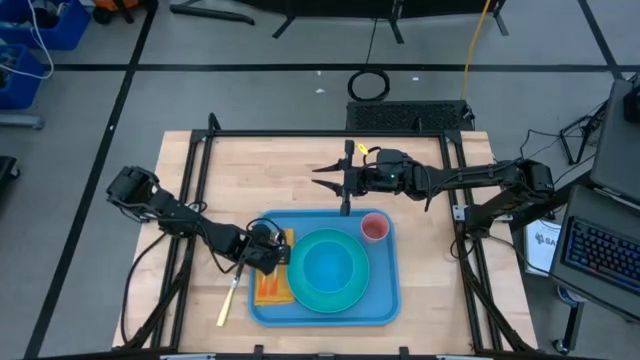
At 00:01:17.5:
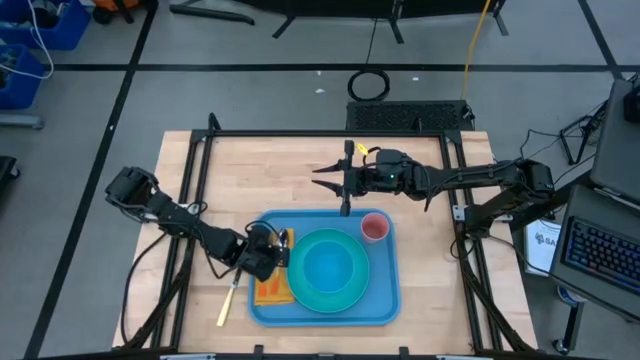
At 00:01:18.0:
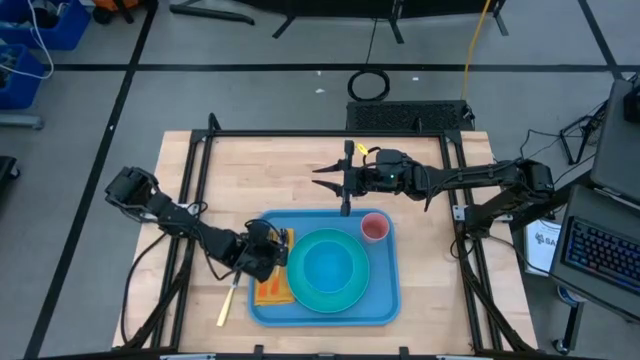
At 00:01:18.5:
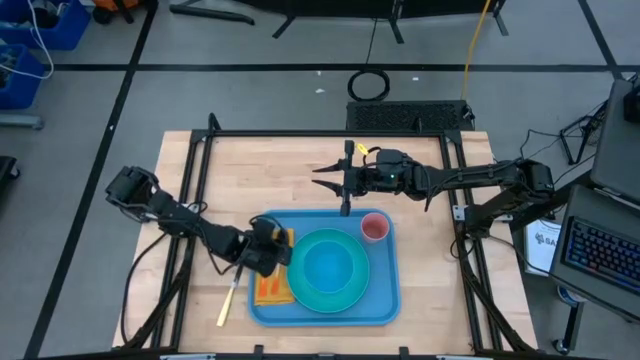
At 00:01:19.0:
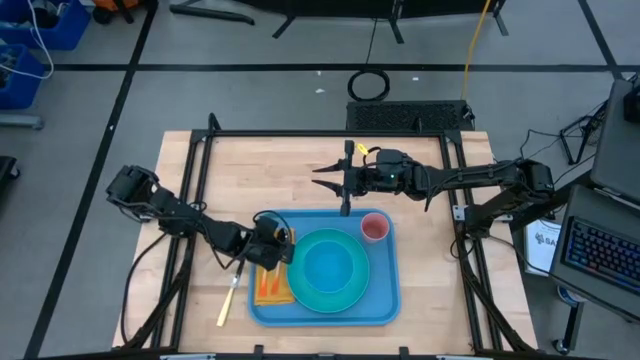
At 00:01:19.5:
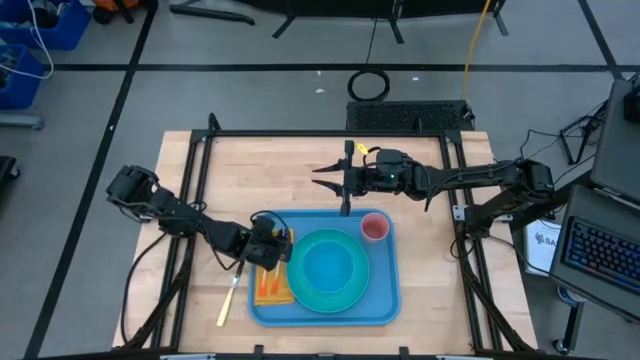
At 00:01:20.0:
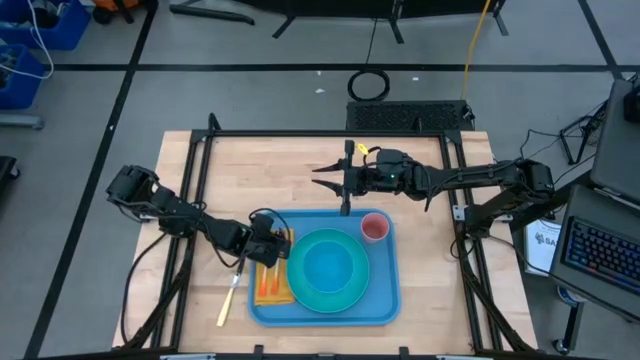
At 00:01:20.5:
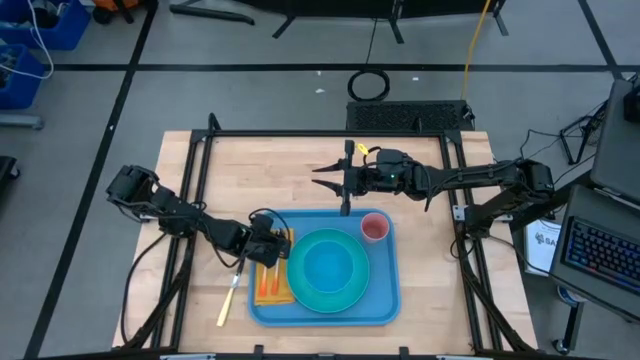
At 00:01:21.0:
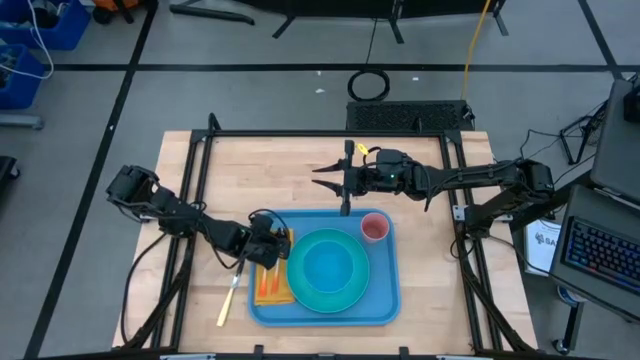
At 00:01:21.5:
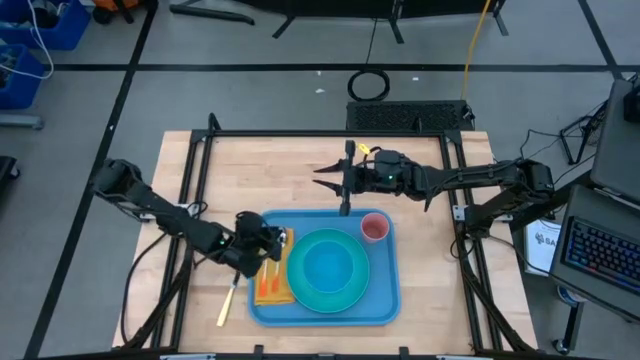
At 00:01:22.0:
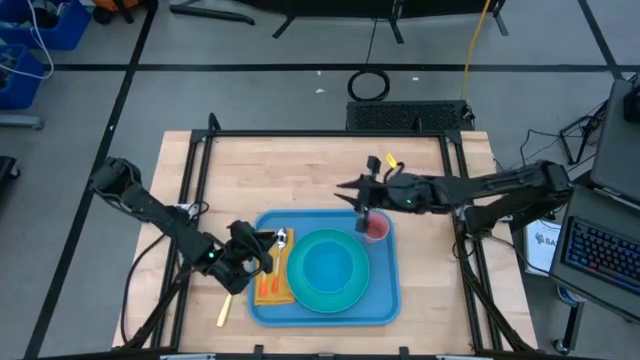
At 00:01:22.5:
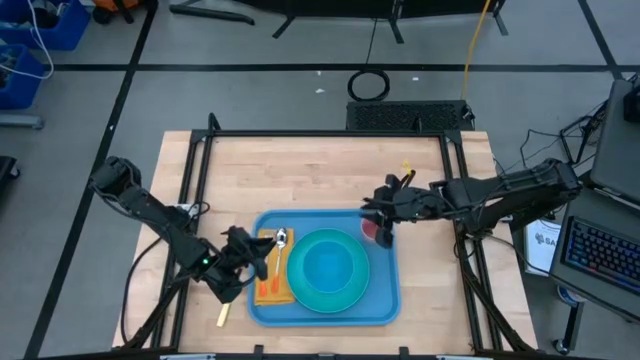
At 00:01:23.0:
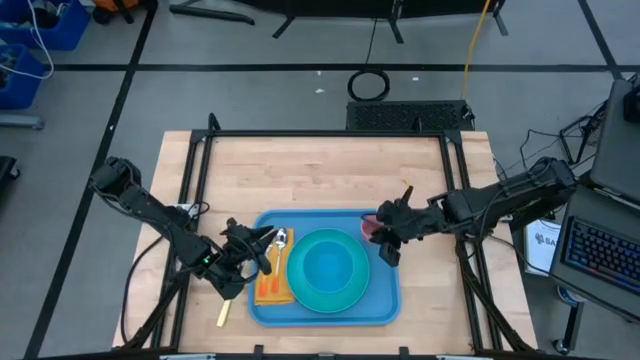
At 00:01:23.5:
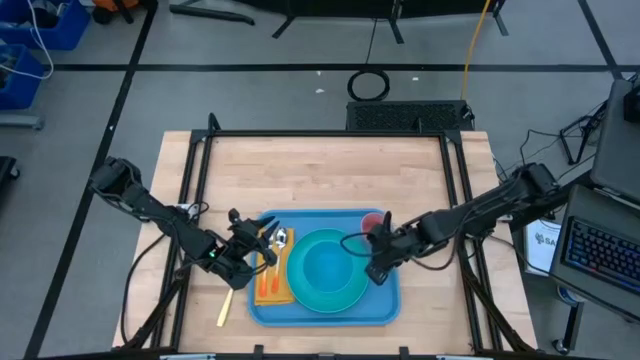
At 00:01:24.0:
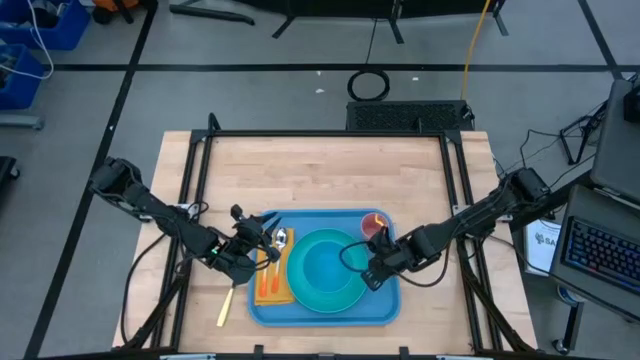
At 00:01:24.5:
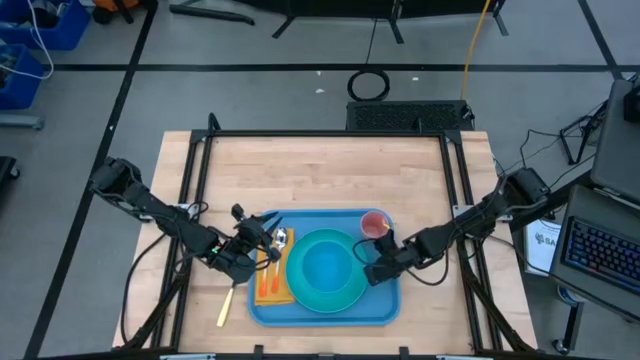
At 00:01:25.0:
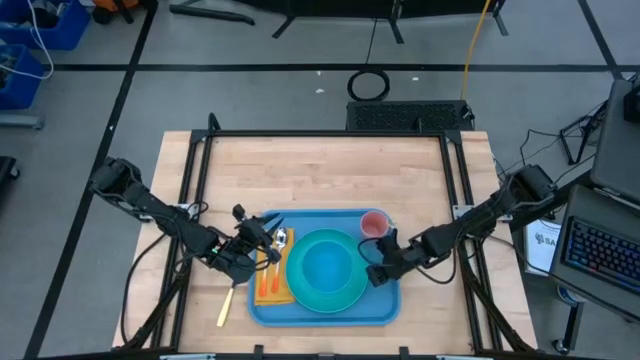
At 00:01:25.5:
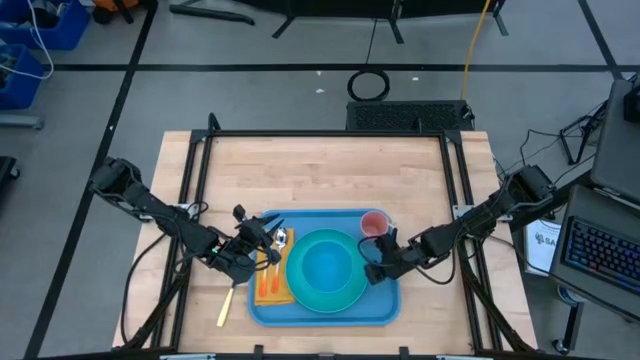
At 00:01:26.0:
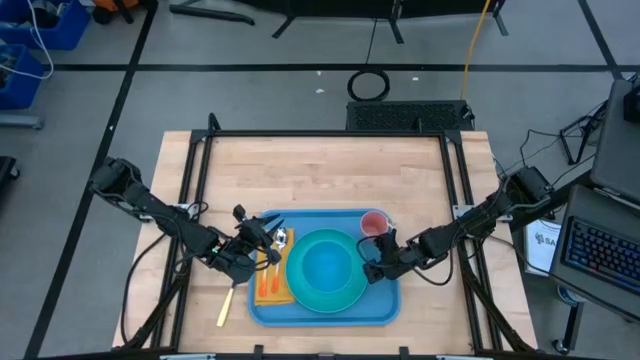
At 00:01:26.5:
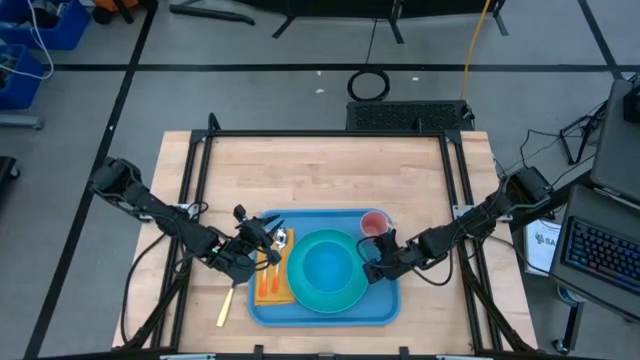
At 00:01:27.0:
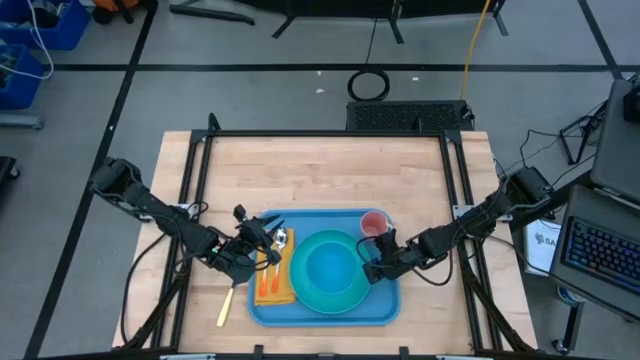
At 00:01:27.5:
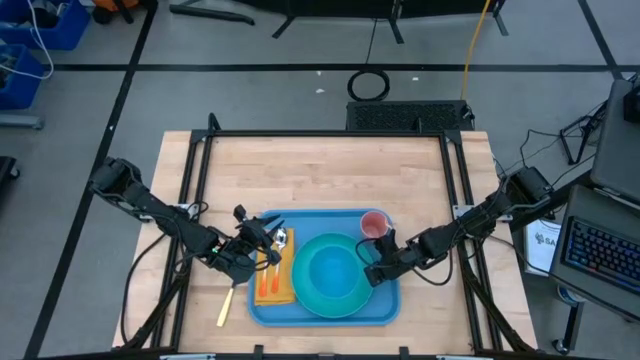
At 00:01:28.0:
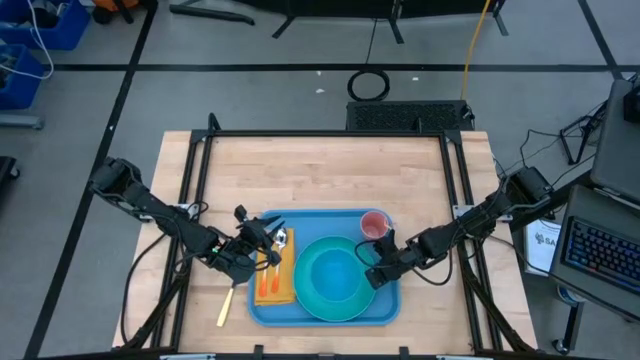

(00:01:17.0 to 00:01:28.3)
Task: Set up tray
Adjust the light blue plate in the blue serving tray

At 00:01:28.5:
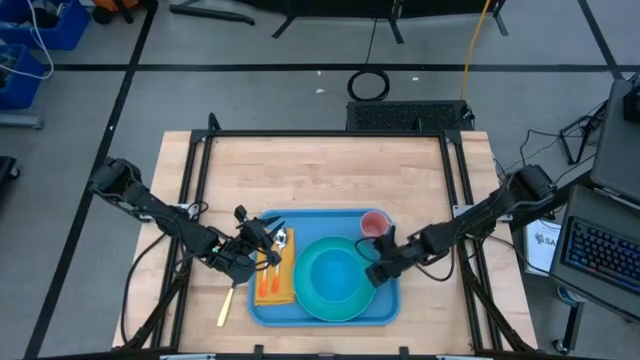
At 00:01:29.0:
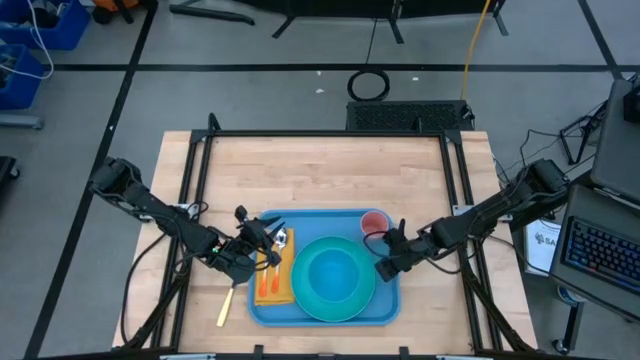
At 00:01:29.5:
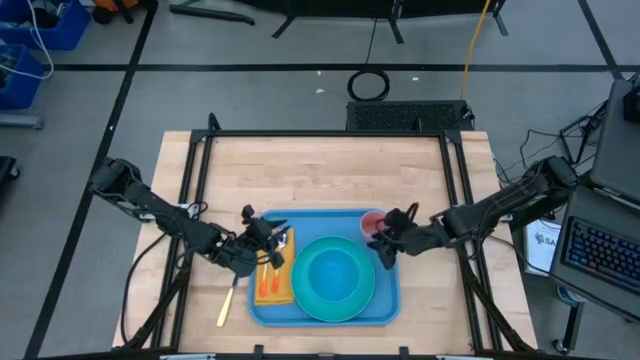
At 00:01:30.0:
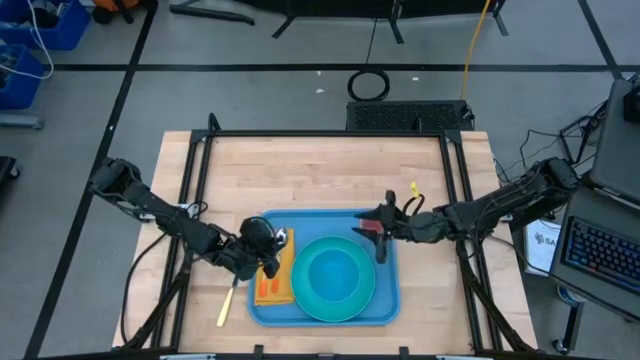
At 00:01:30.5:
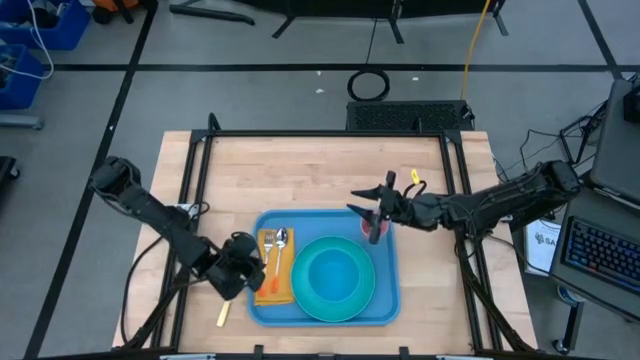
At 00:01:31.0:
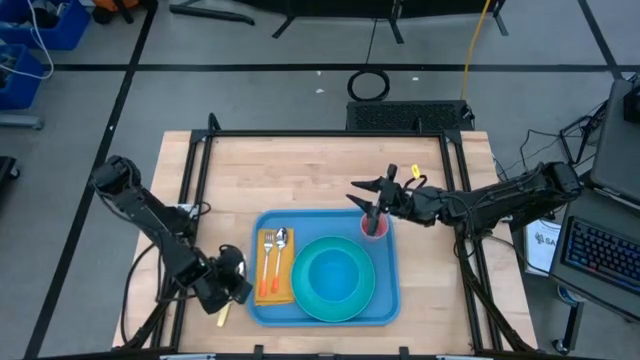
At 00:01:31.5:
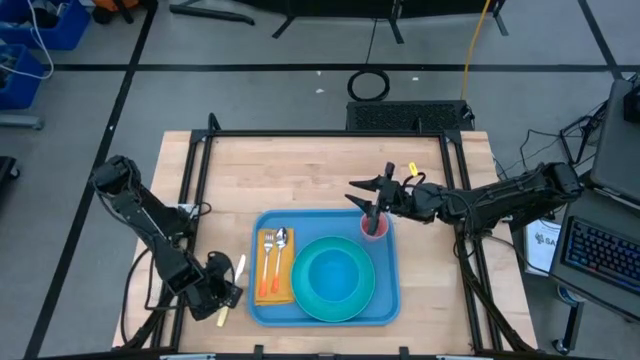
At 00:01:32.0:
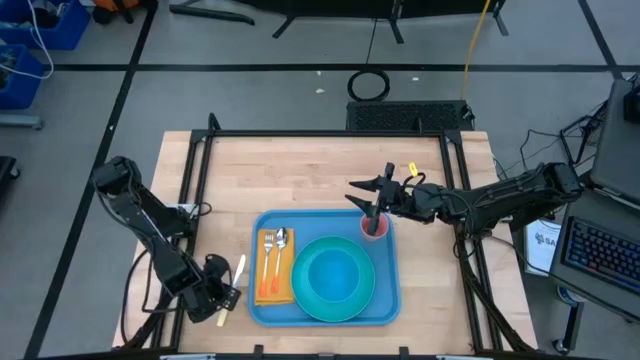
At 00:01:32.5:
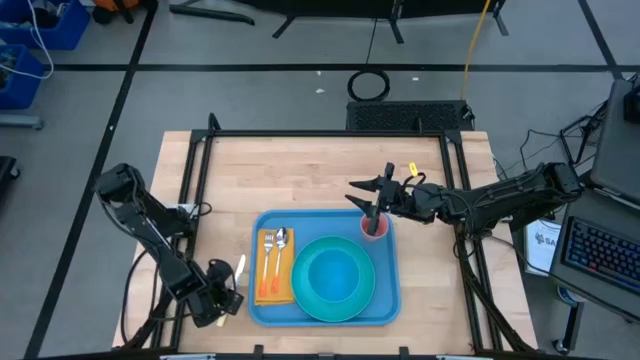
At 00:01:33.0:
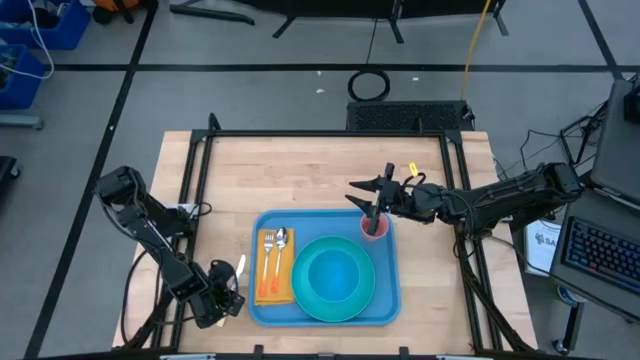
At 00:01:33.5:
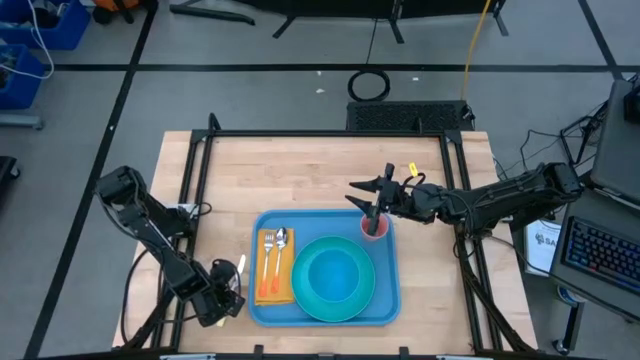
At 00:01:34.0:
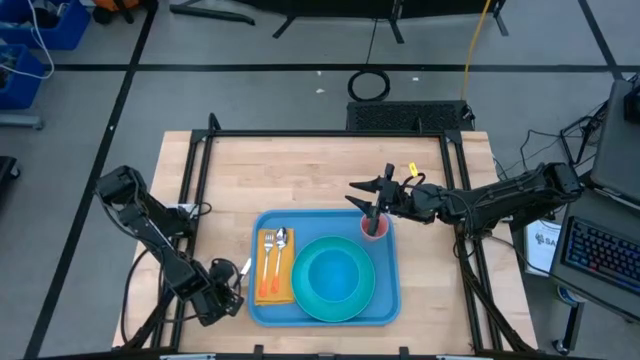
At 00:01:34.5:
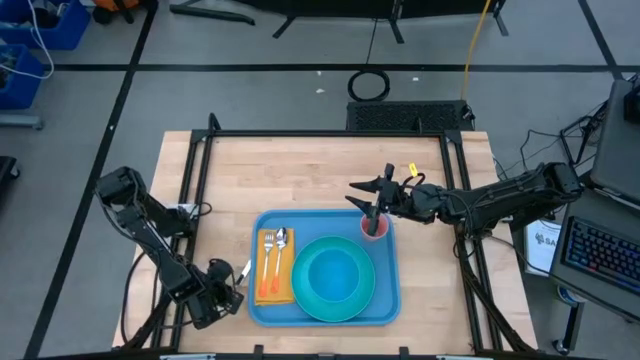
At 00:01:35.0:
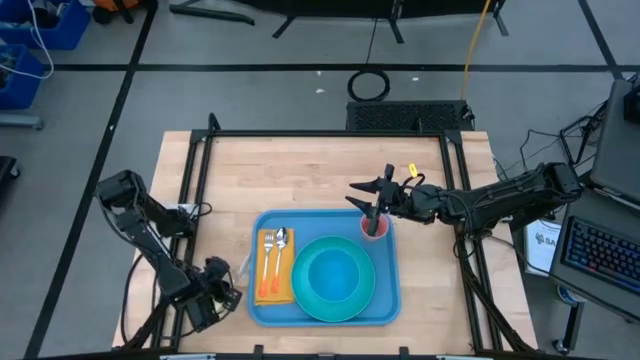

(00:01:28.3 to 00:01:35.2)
Put the yellow knife on top of the yellow napkin in the blue serving tray

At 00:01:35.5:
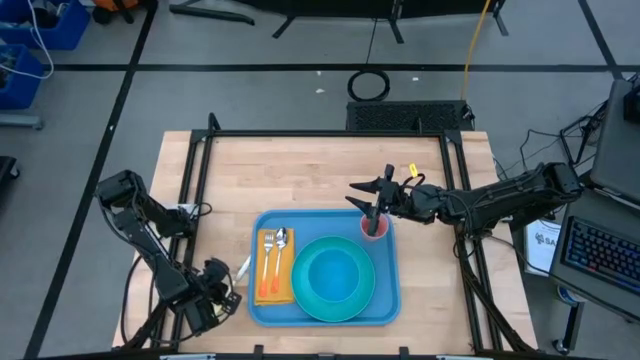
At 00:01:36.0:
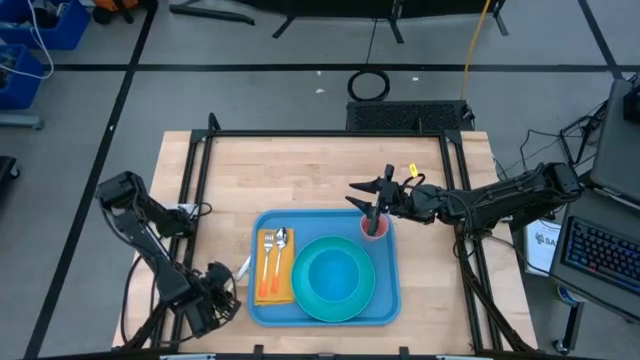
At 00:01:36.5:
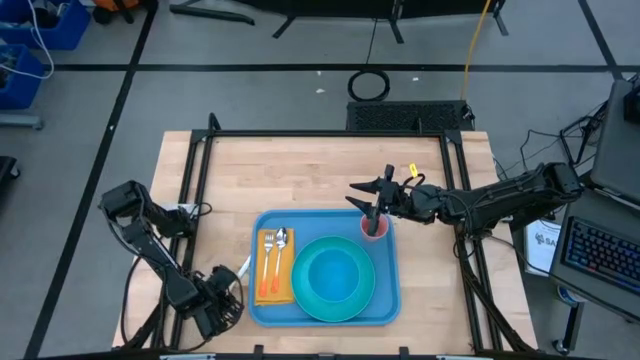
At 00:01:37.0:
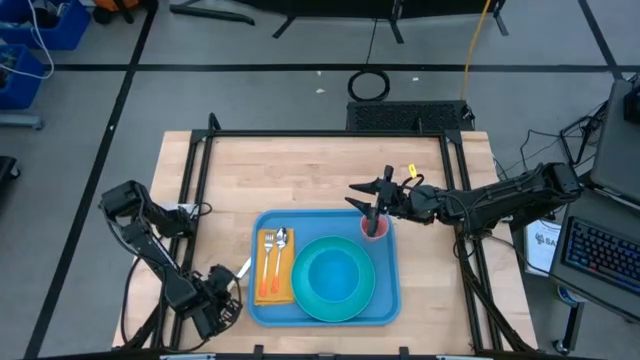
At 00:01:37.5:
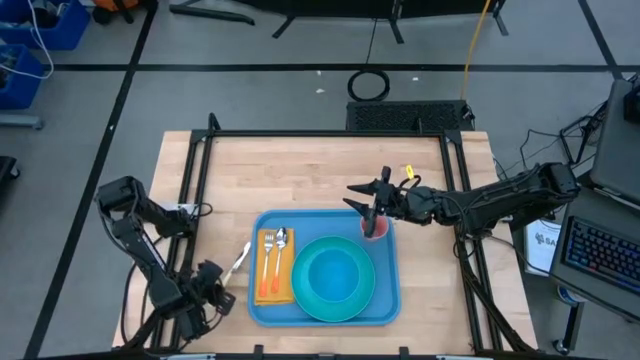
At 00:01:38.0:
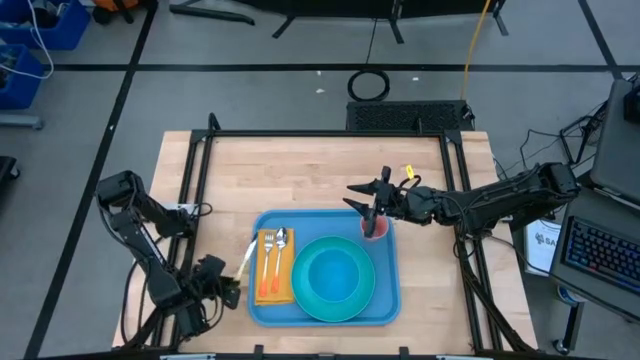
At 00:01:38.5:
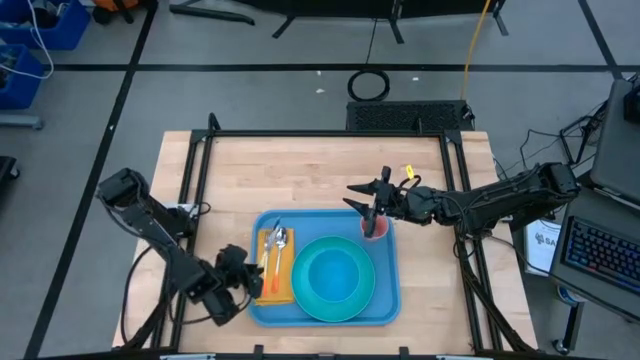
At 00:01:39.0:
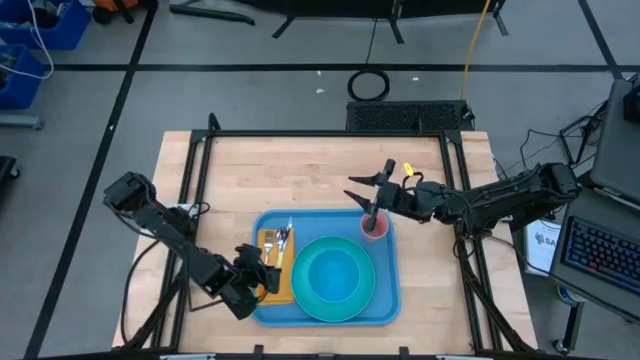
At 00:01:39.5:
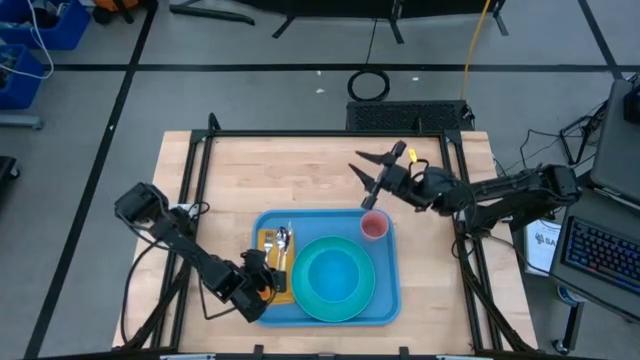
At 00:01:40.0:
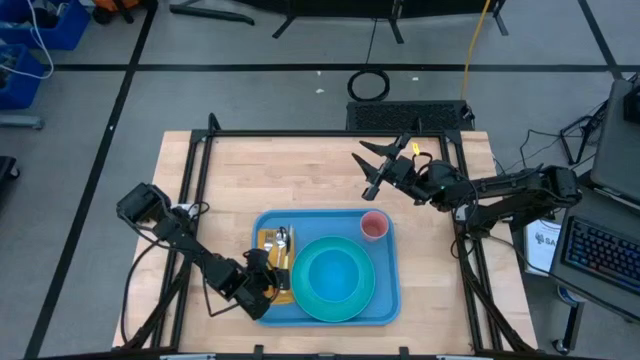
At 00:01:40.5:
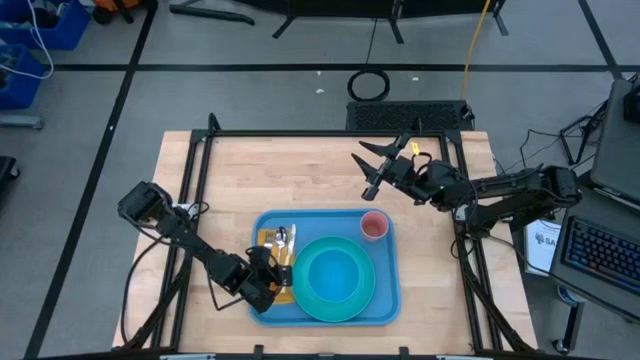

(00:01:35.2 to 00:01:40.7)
Put the yellow knife on top of the yellow napkin in the blue serving tray
